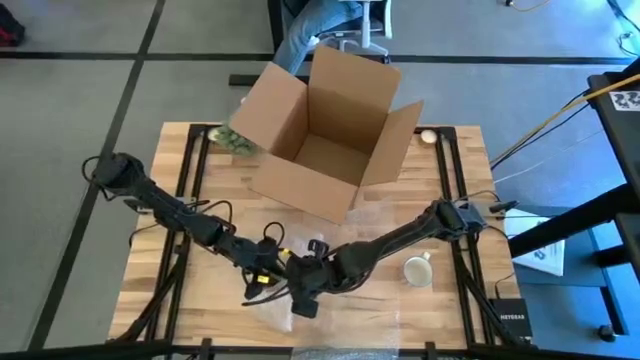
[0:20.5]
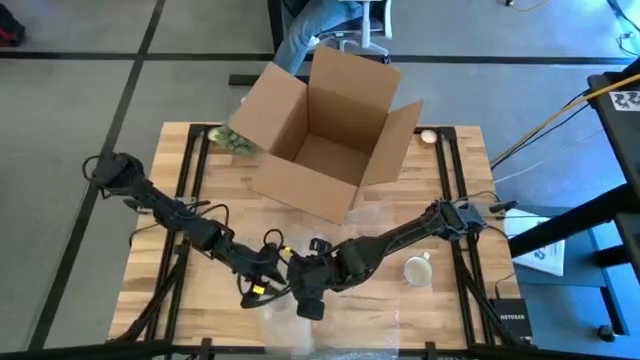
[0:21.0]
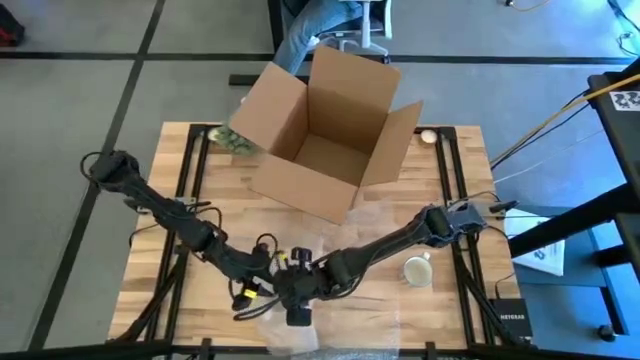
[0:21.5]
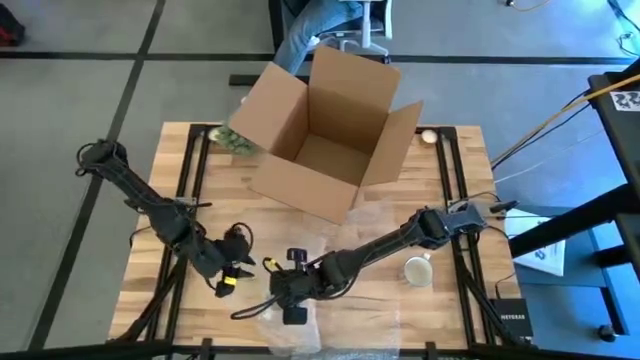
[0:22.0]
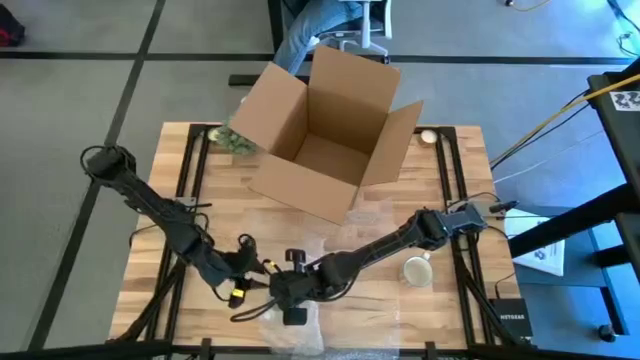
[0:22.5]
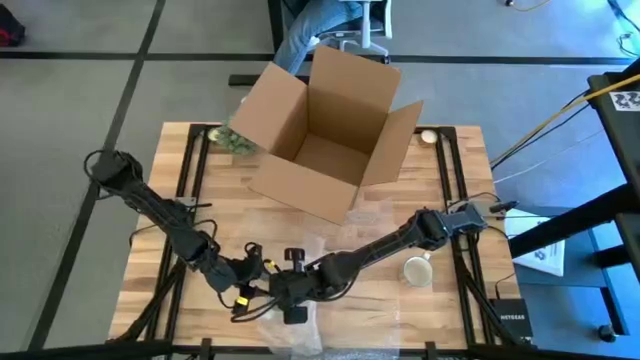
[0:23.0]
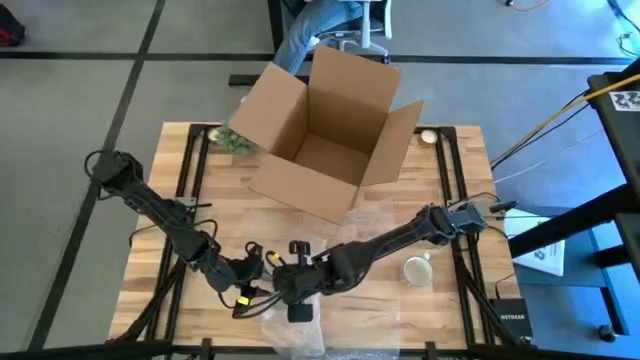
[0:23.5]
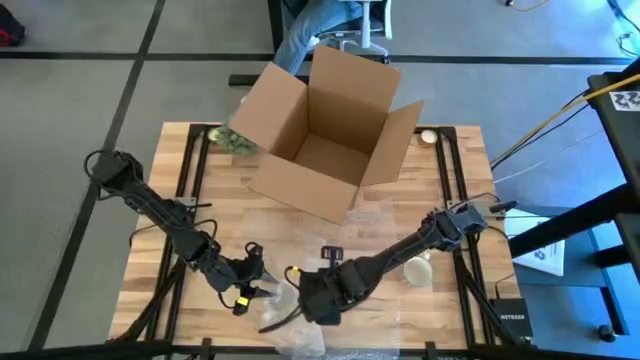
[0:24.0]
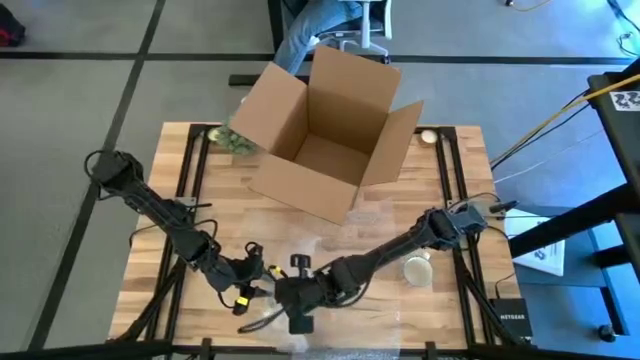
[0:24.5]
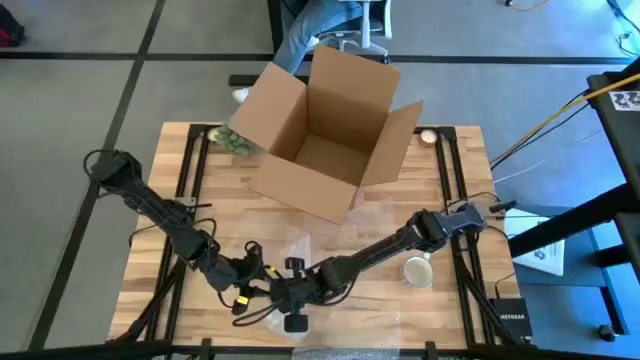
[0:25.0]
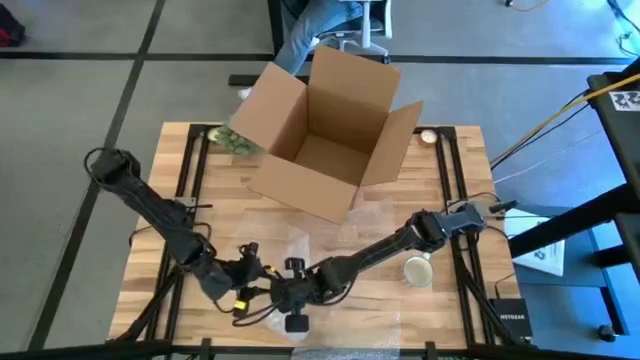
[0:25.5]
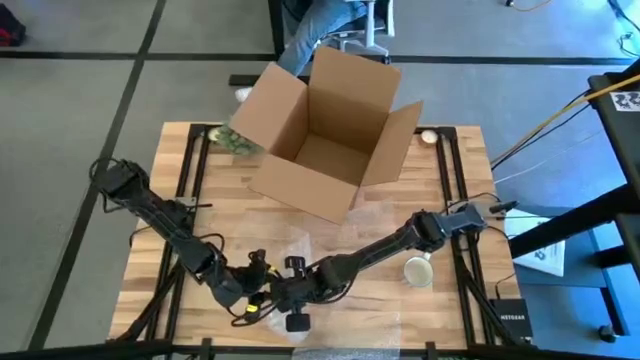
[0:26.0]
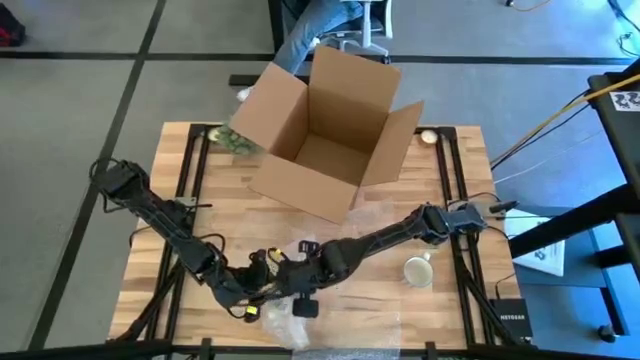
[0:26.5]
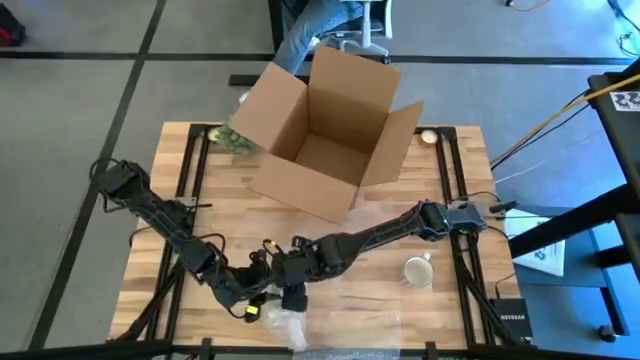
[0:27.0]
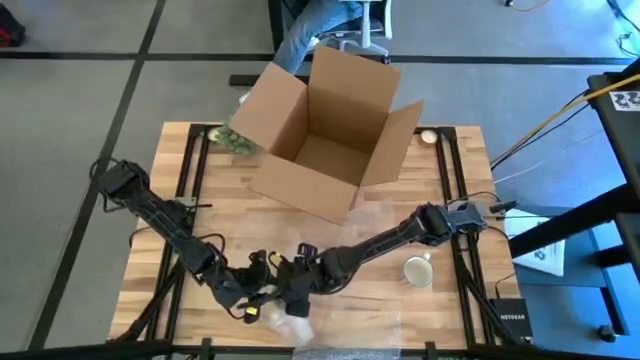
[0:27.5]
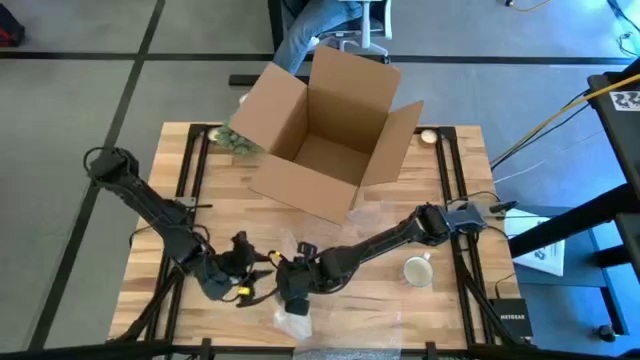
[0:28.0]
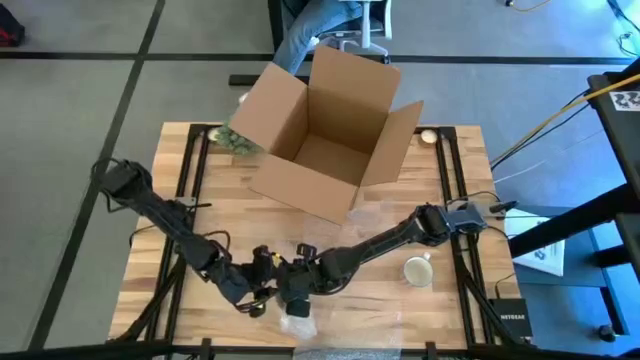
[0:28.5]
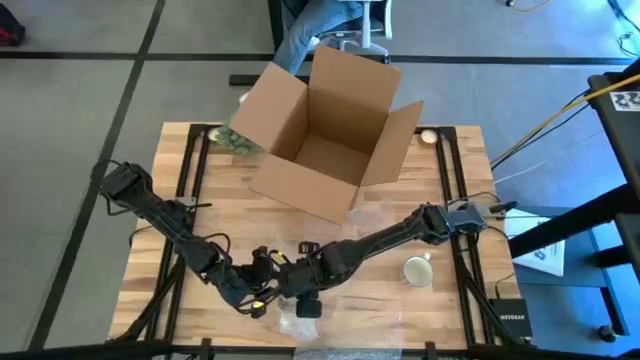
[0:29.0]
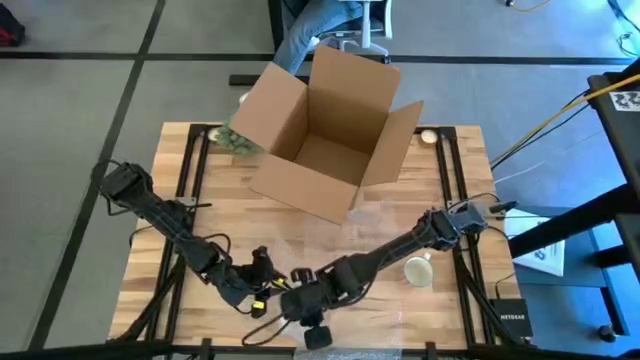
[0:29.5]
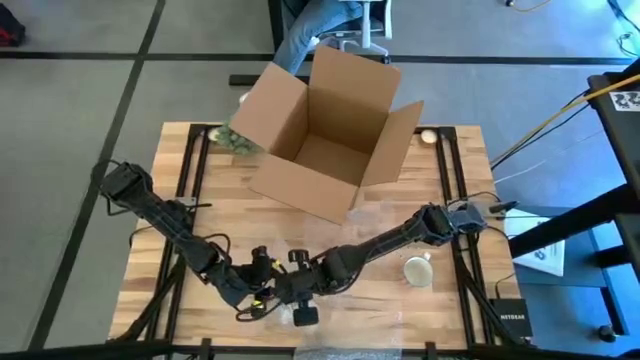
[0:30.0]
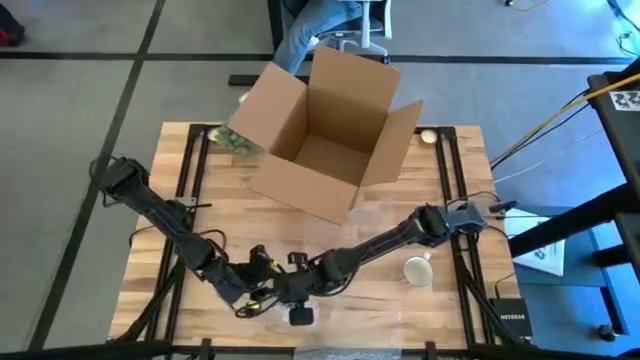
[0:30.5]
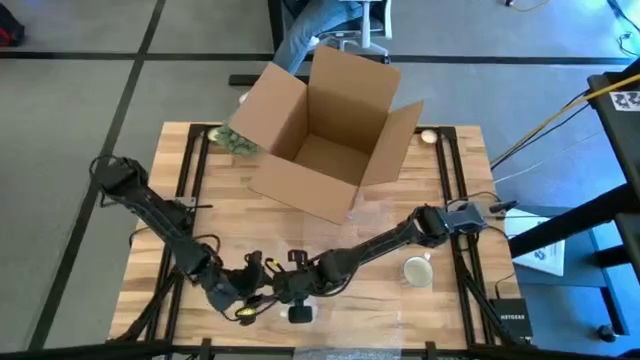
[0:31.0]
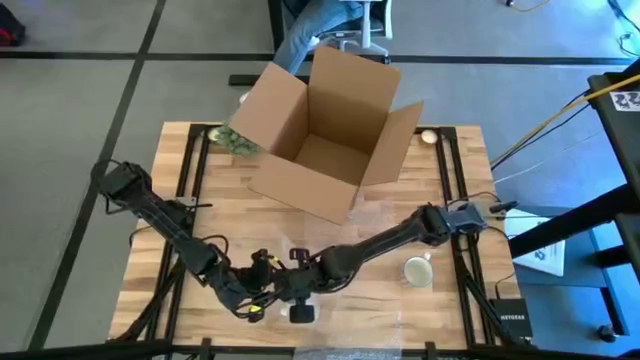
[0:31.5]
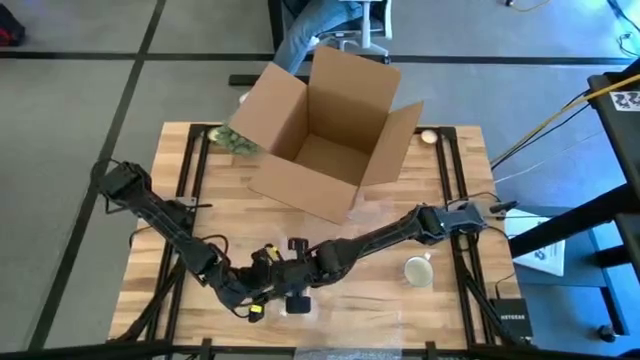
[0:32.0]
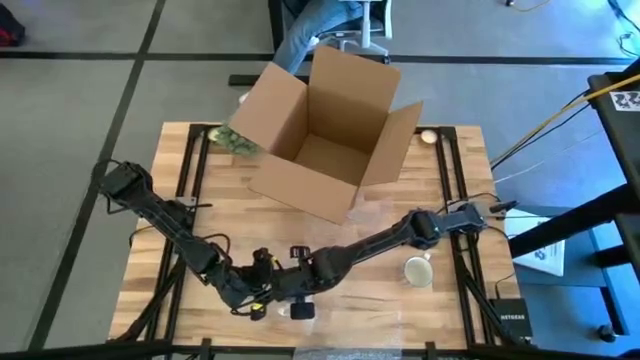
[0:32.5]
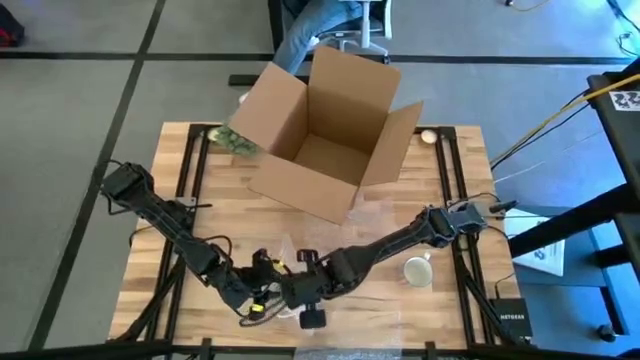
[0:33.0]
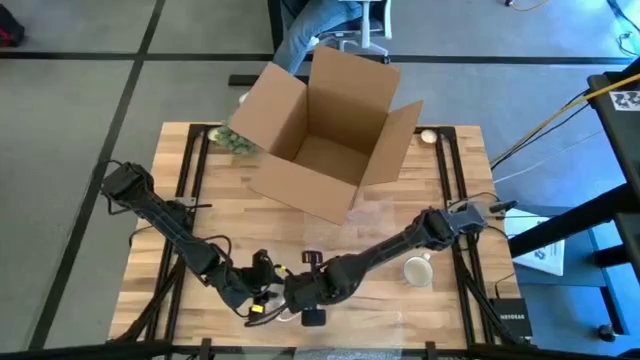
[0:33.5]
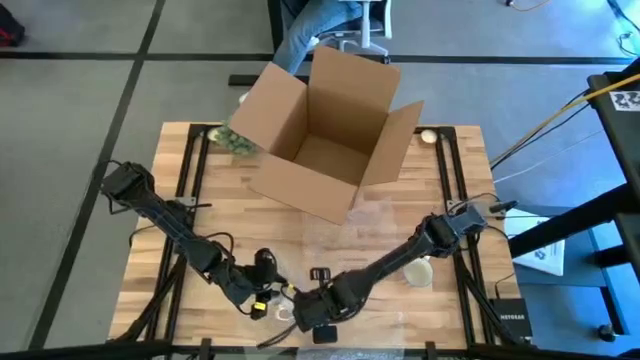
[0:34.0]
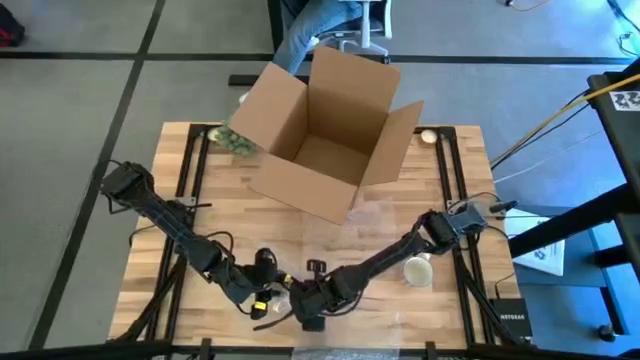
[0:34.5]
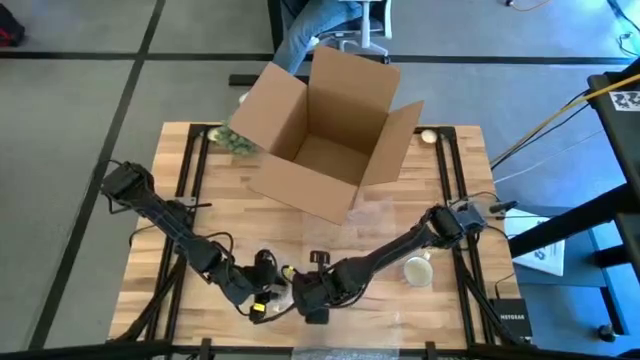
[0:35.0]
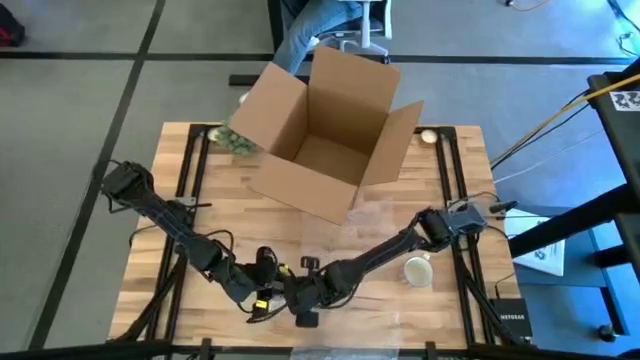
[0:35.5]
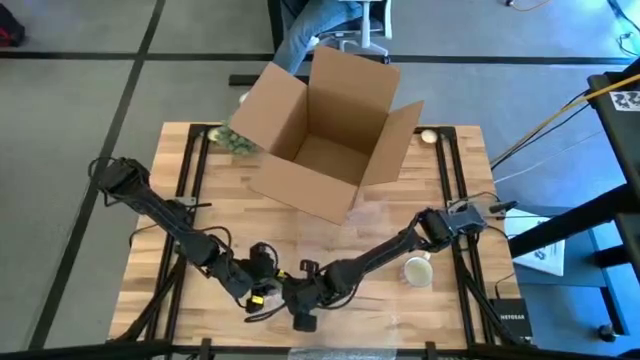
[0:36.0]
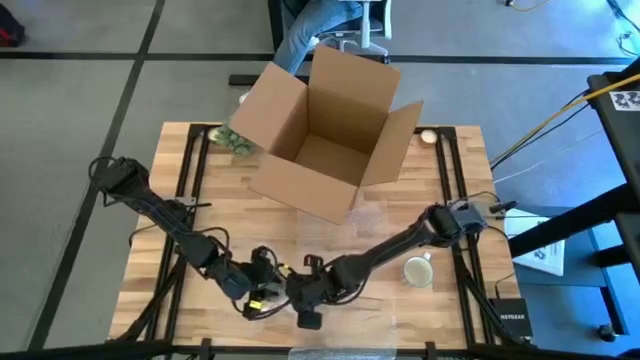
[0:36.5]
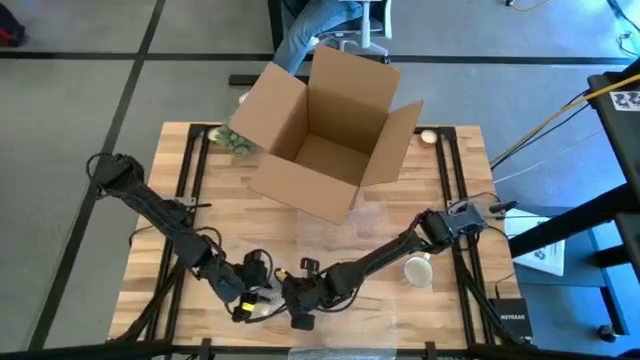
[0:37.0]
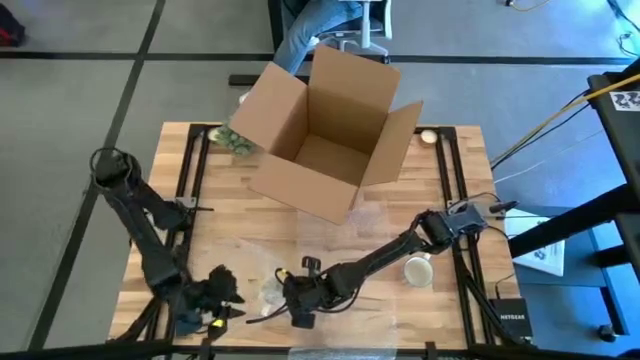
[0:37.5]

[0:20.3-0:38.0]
Task: wrap mug
Wrap the orange mug with the left bubble wrap

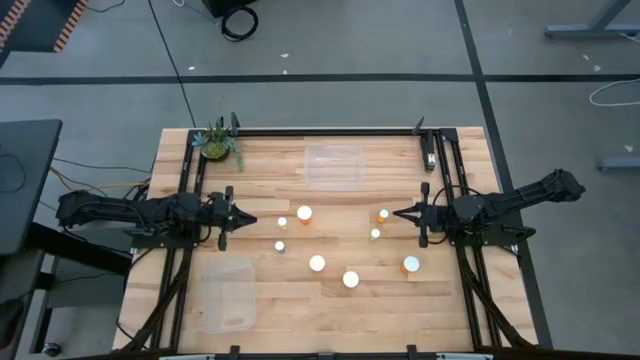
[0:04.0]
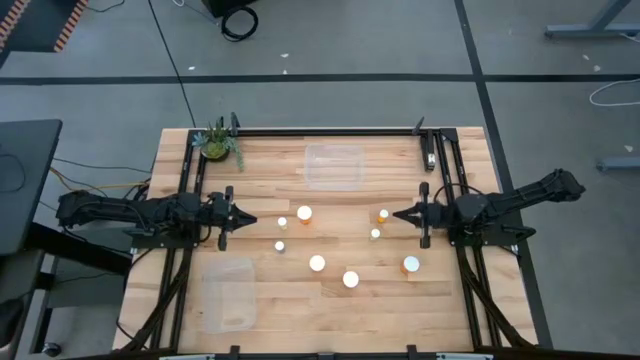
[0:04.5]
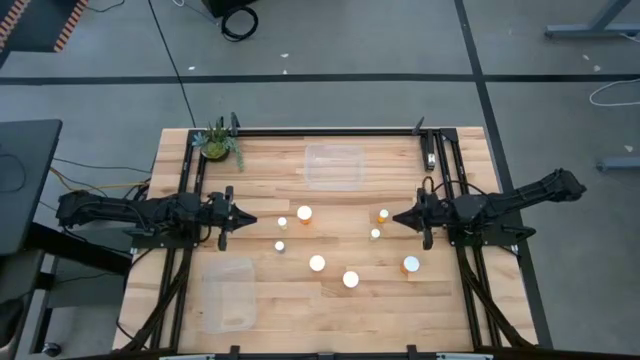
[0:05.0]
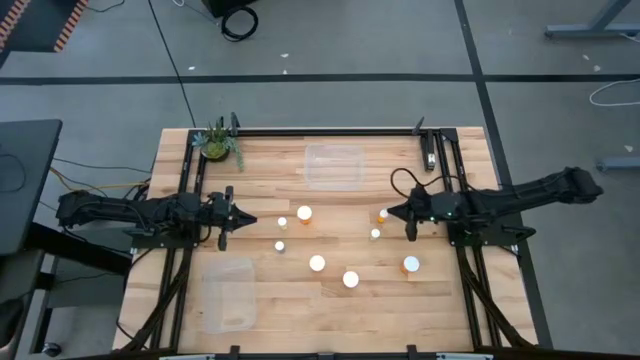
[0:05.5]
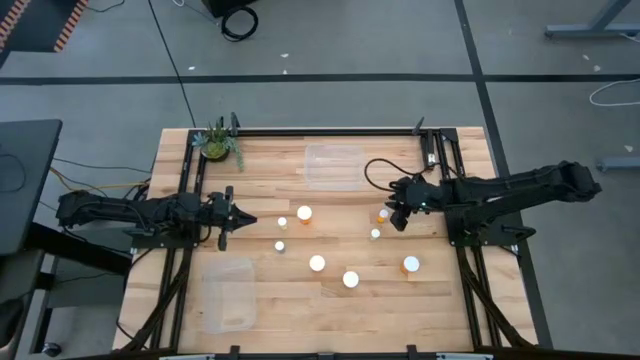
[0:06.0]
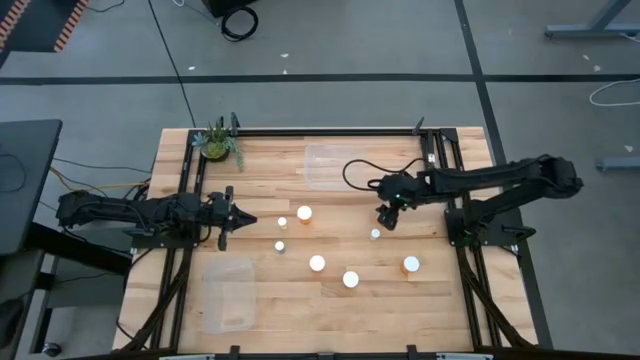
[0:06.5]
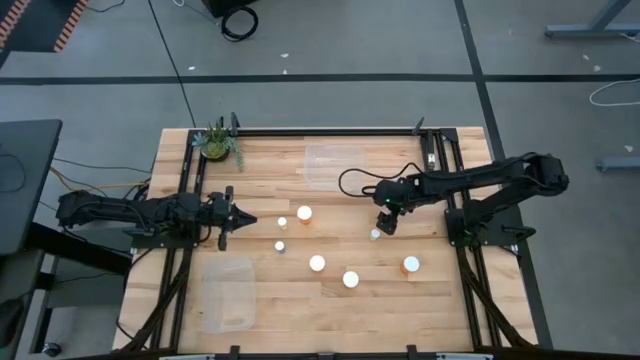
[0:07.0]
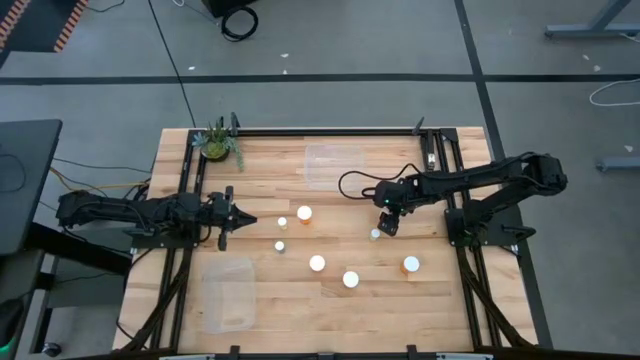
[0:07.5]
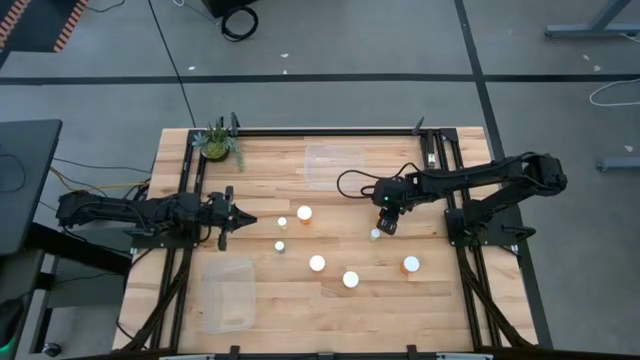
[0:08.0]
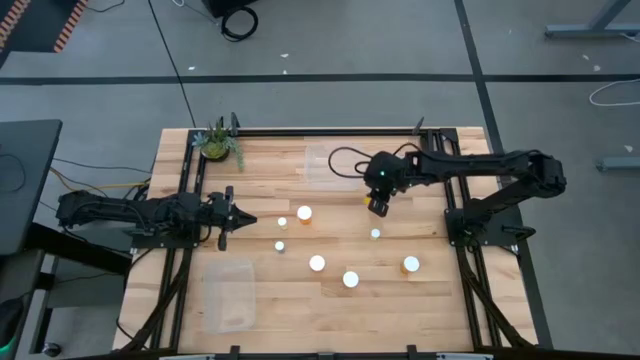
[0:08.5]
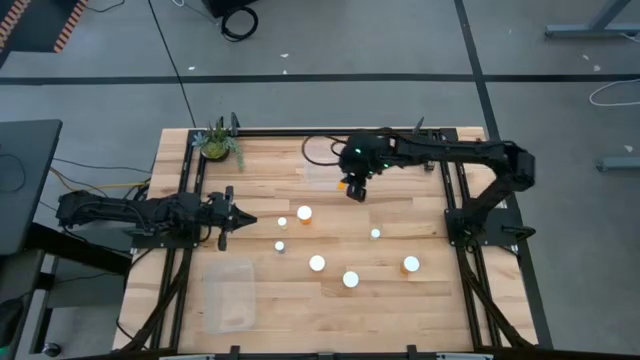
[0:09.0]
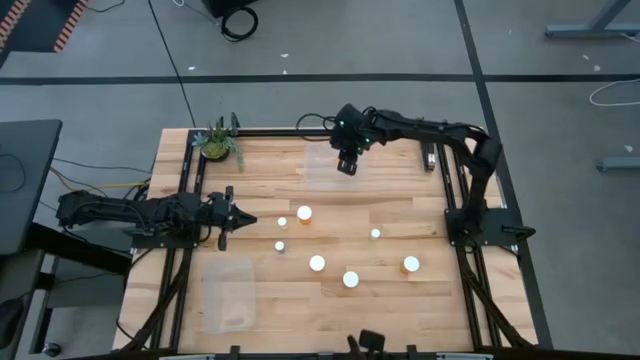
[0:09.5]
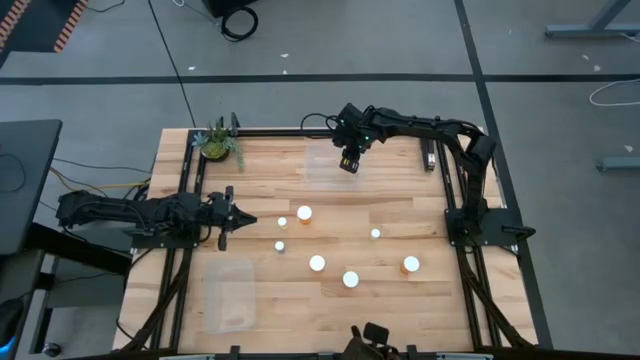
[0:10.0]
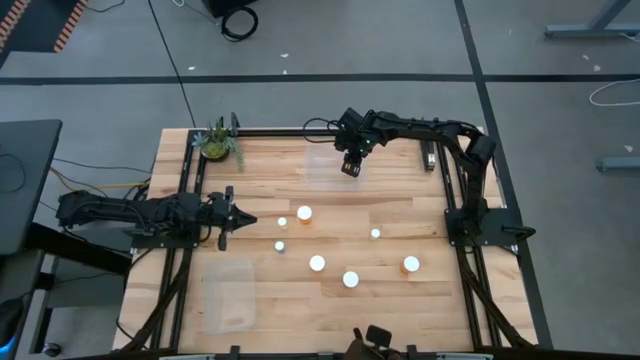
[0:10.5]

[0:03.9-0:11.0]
Task: Pick and place medicine bottles into bin by pill shape (circle, oval)
Put the orange tablet bottle into the top transparent bin
